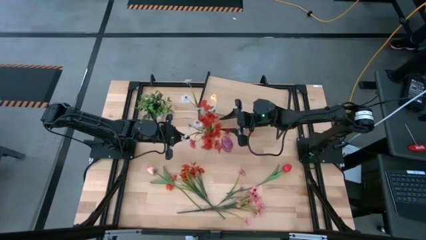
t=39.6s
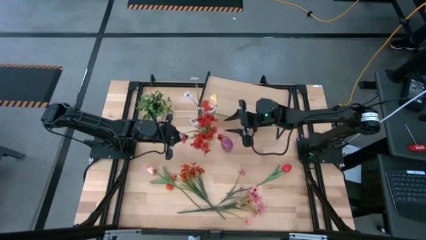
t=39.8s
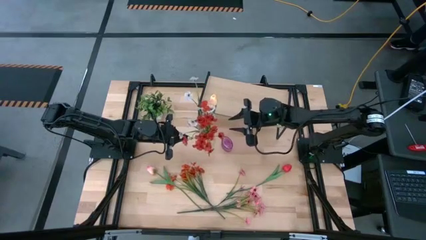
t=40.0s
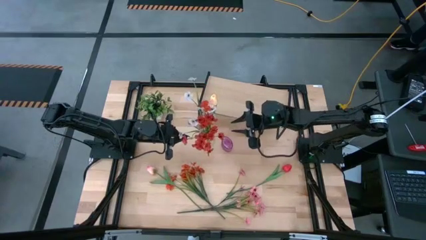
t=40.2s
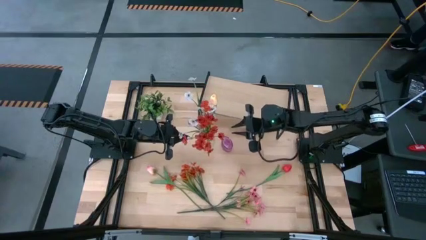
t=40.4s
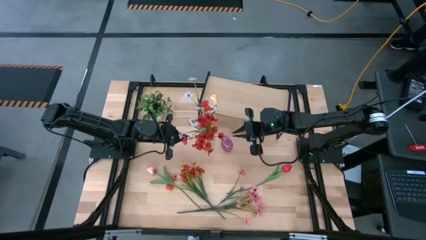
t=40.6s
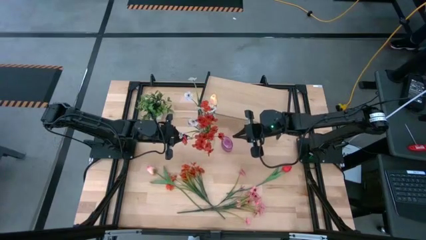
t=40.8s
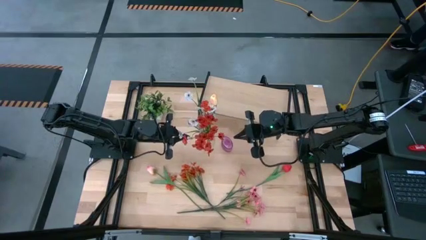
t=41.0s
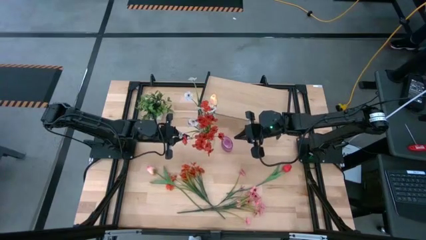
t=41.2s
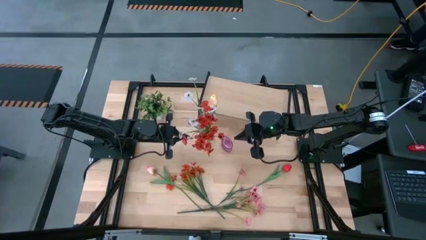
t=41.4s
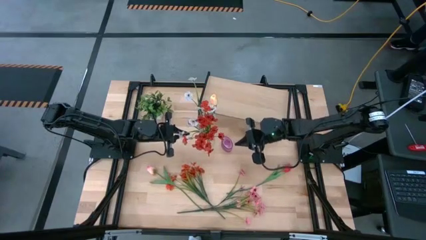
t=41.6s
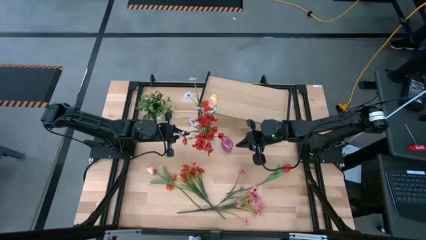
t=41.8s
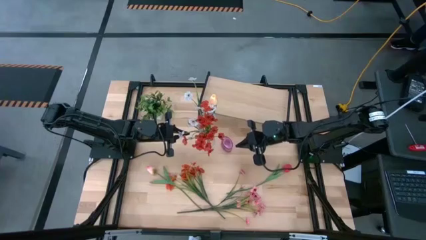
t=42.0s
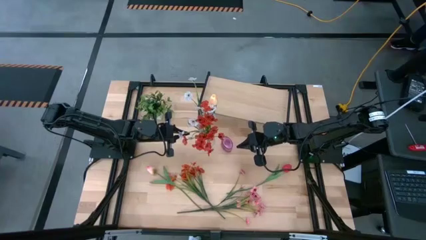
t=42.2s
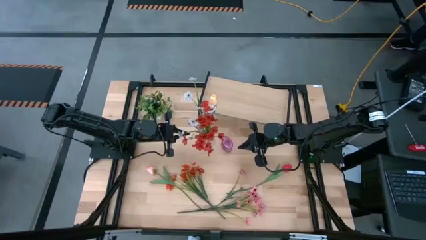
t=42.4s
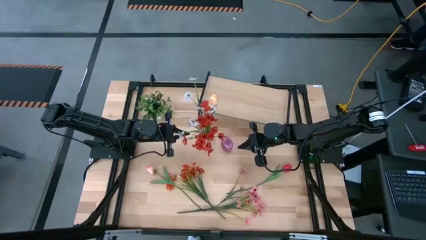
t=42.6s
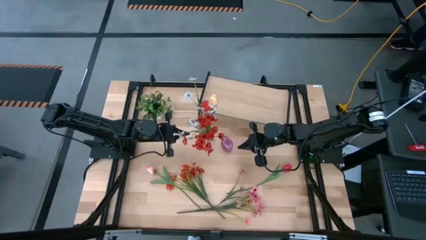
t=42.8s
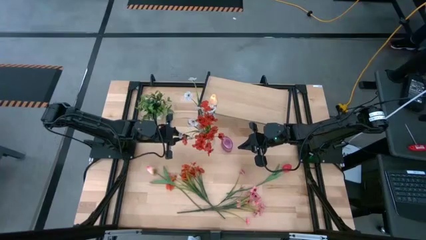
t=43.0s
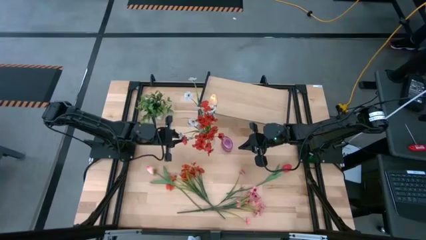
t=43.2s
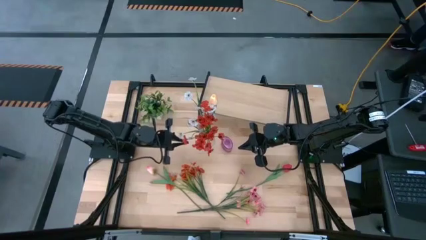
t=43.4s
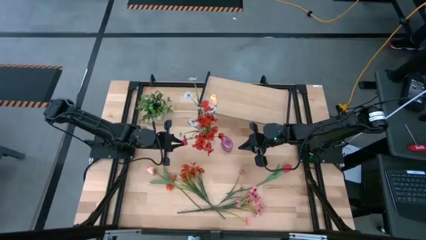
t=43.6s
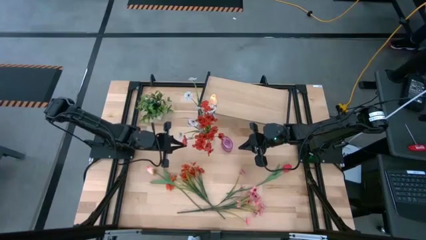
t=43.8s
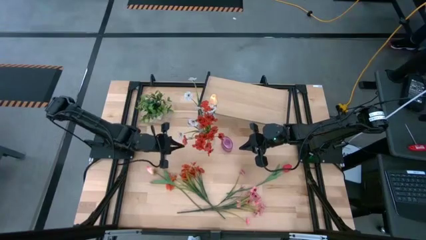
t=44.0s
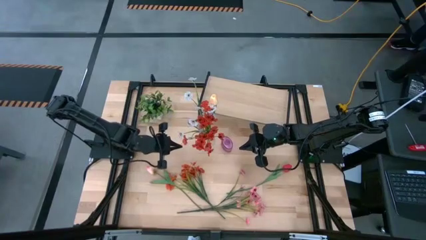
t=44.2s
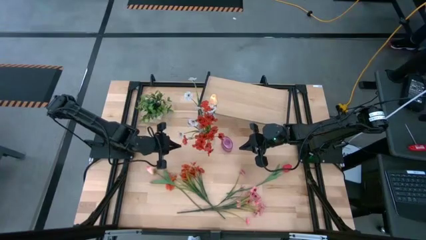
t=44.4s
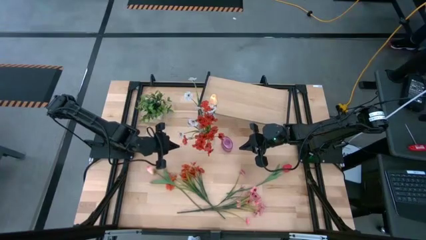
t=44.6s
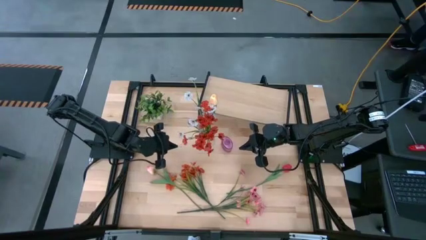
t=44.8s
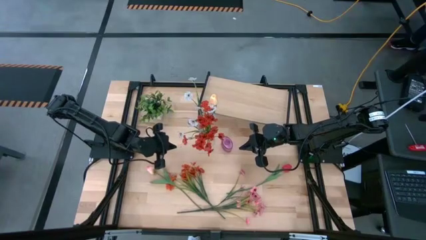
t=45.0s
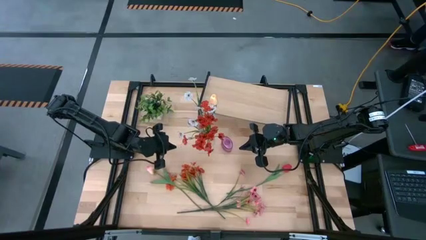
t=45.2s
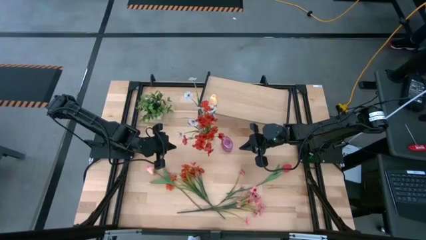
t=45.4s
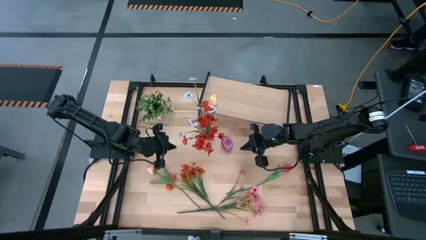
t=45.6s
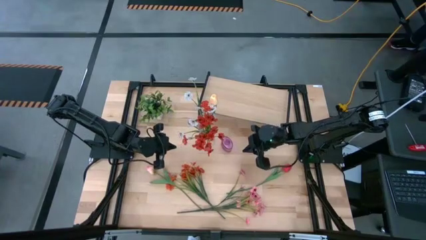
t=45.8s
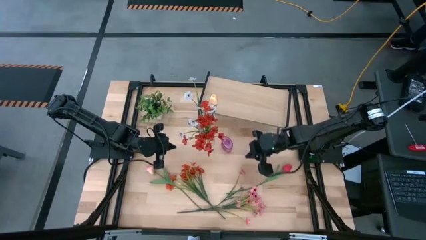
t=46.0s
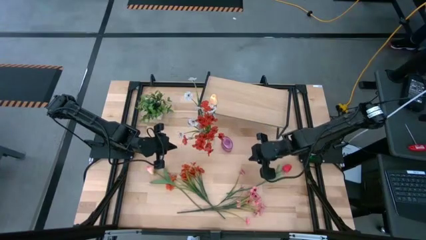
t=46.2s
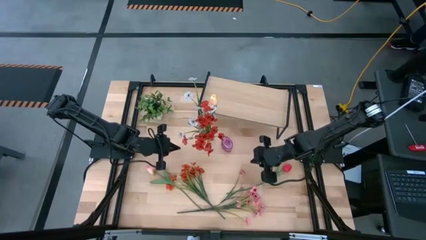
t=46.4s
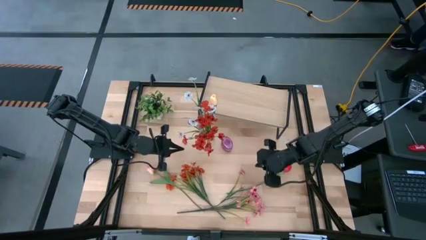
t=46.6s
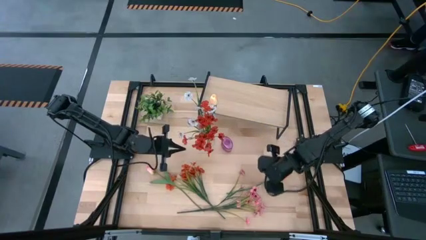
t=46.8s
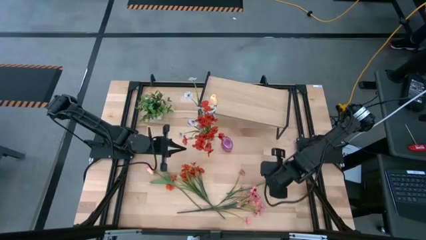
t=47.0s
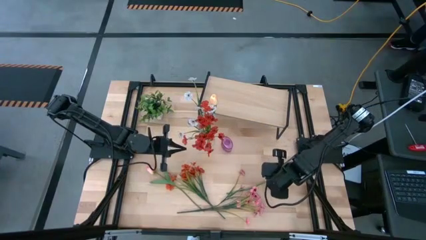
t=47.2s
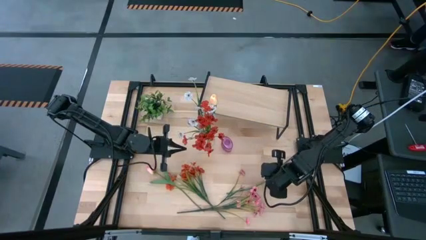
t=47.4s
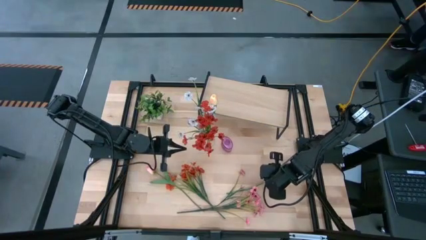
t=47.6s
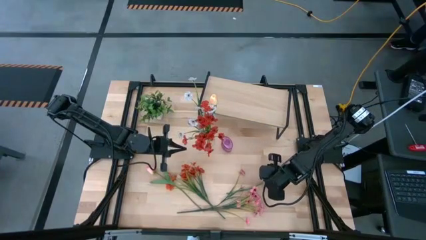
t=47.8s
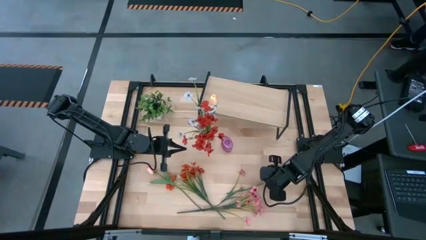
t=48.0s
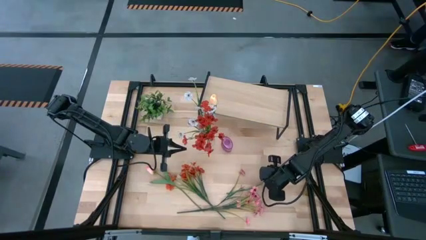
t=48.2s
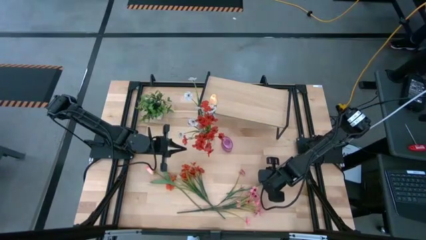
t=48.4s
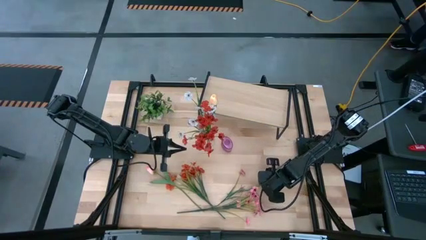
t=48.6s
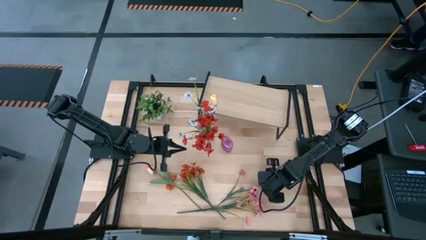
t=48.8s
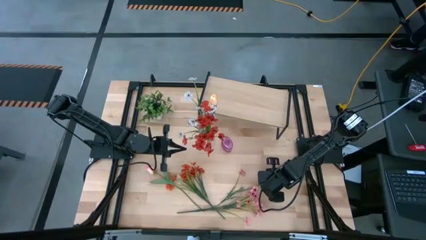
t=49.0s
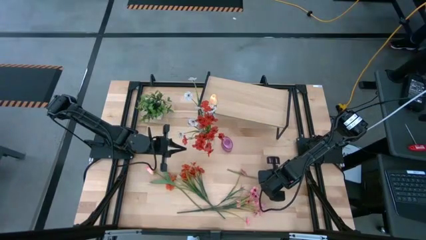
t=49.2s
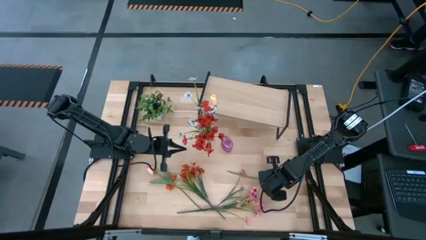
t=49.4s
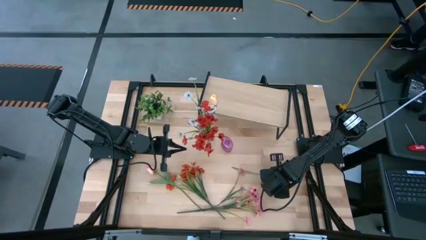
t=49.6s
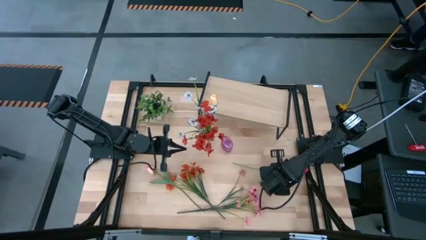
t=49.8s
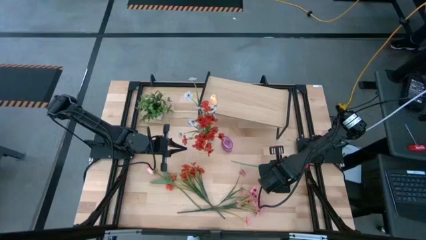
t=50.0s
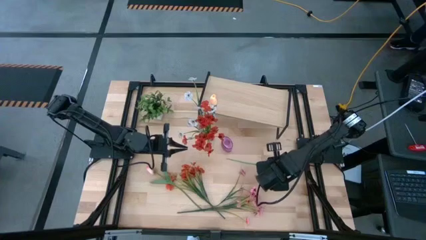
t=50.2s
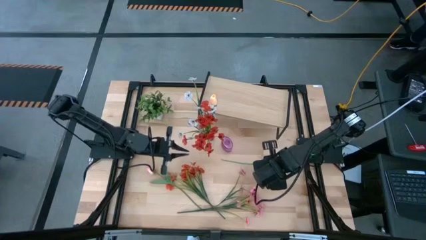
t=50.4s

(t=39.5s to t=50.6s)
Task: Pick and place flowers into a vace then onto a shelf
Put the red tulip into the transparent vase

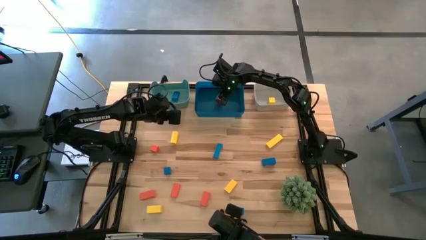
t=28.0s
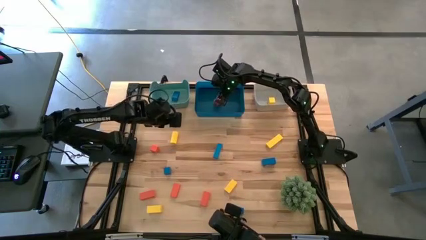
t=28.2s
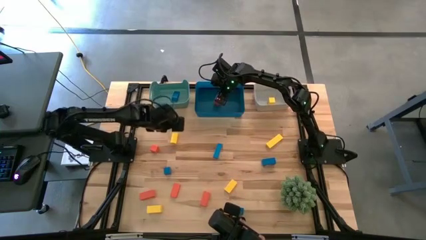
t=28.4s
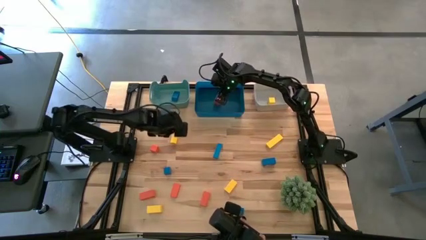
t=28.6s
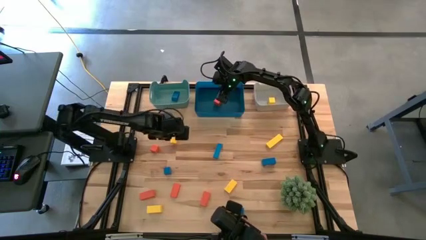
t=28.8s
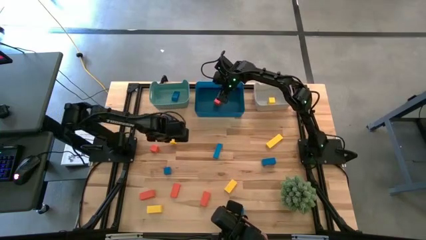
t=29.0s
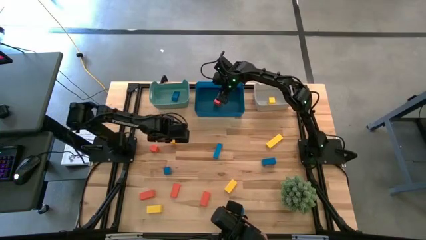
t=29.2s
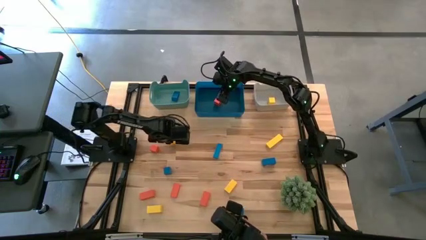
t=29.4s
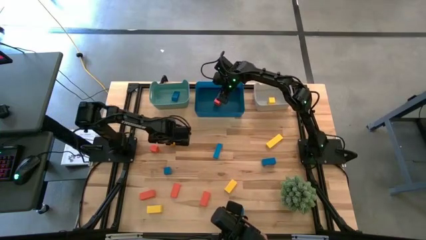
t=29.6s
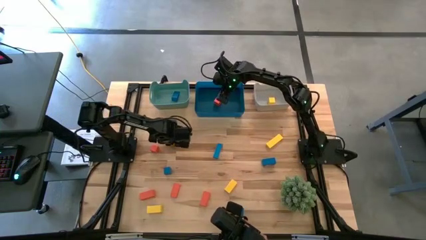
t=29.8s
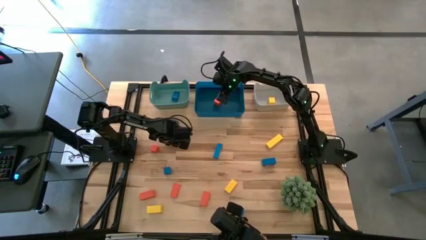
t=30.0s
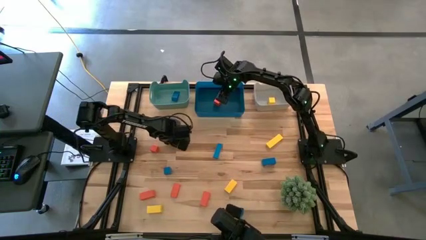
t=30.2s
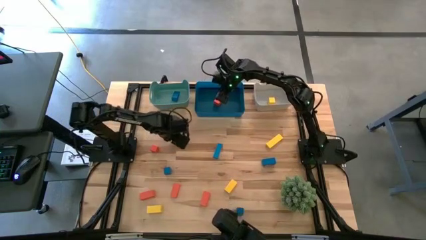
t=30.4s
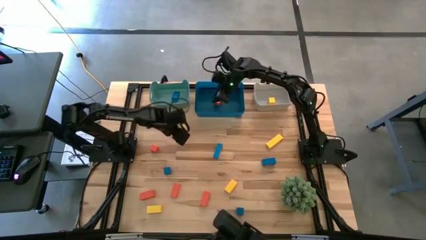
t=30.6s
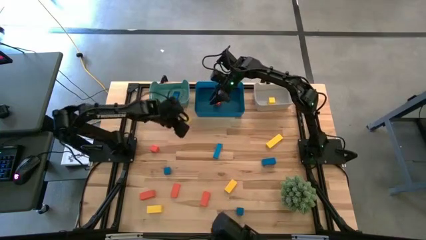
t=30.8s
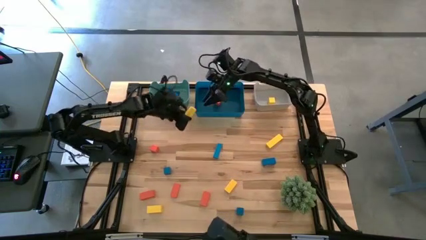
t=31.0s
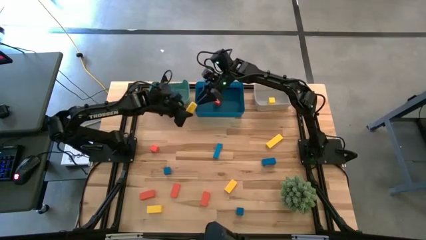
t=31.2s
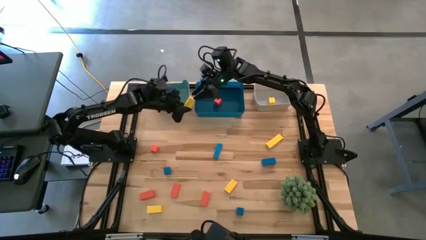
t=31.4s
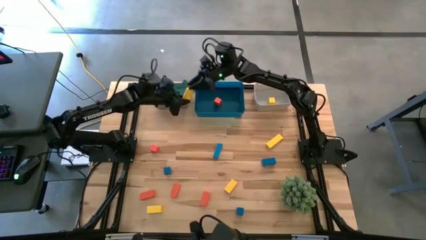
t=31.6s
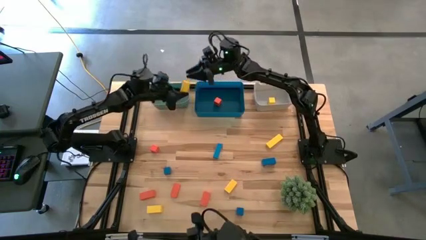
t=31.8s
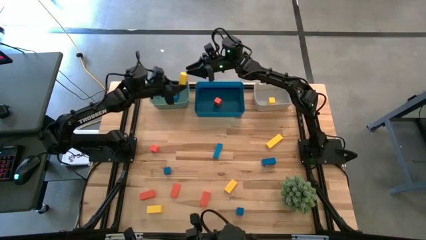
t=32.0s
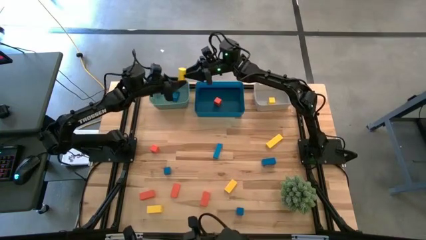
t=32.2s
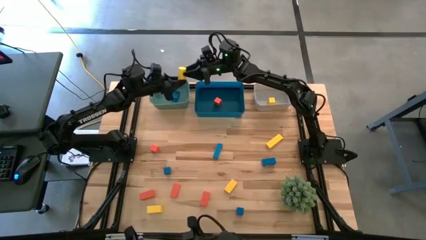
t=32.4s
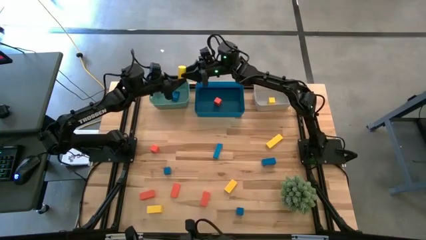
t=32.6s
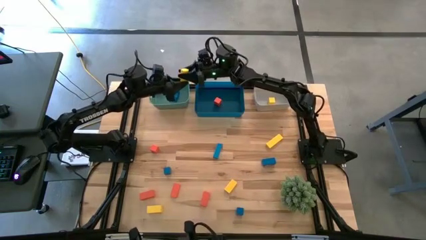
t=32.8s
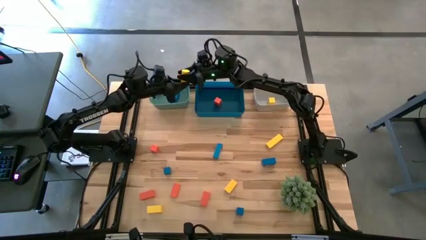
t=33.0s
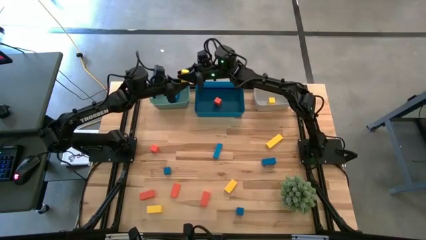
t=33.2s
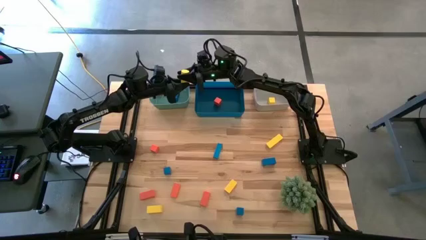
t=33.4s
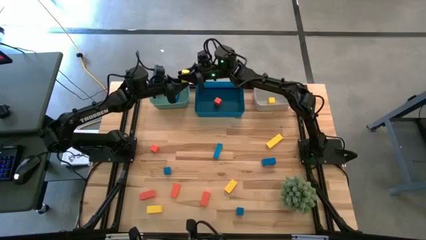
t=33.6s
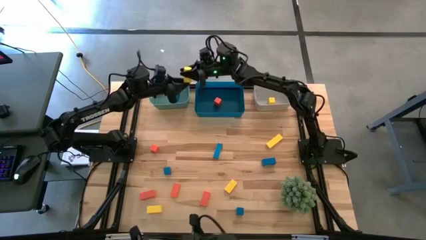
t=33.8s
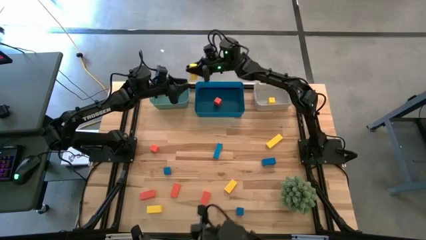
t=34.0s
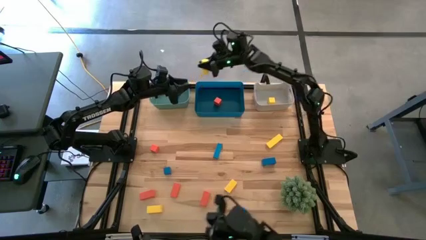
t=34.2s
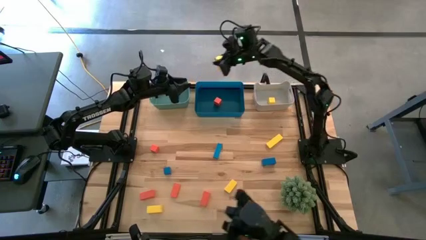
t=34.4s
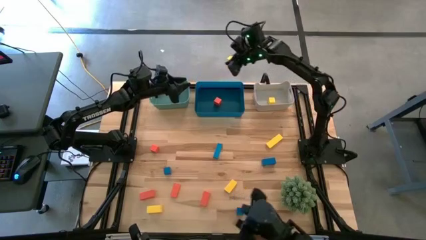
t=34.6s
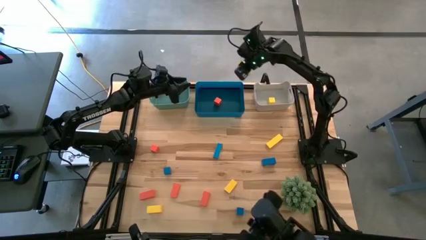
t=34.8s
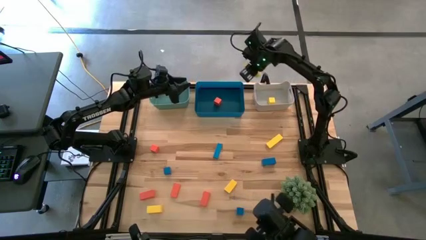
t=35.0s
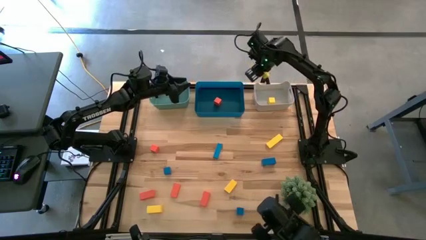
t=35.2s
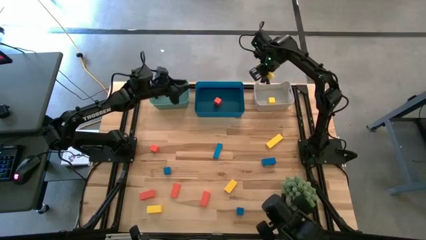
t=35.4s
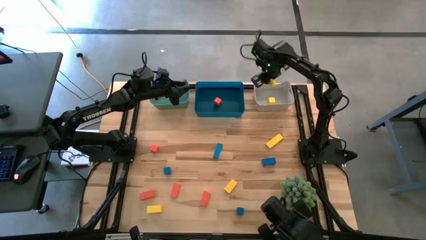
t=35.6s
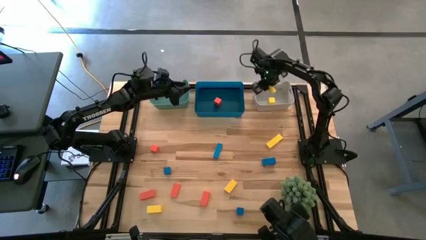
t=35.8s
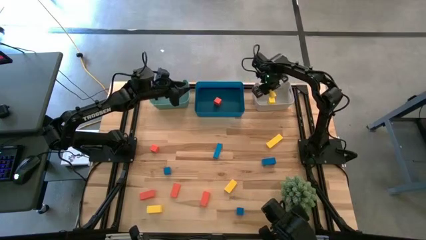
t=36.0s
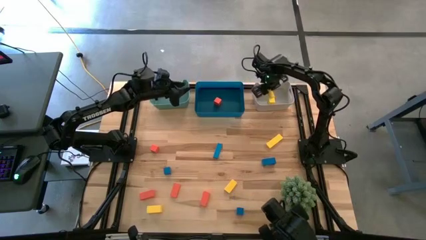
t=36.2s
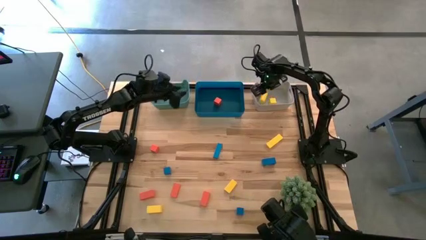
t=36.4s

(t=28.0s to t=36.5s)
Task: Sort & place blocks by color
Put the yellow block into the white bin
